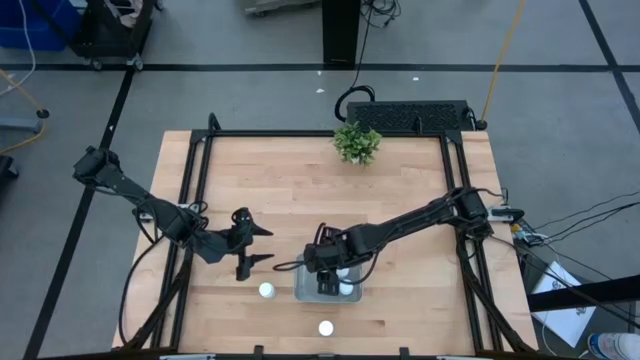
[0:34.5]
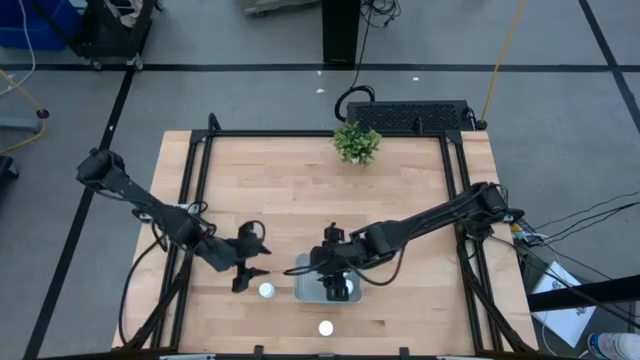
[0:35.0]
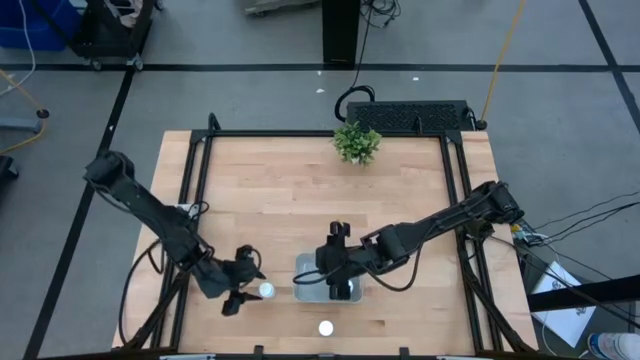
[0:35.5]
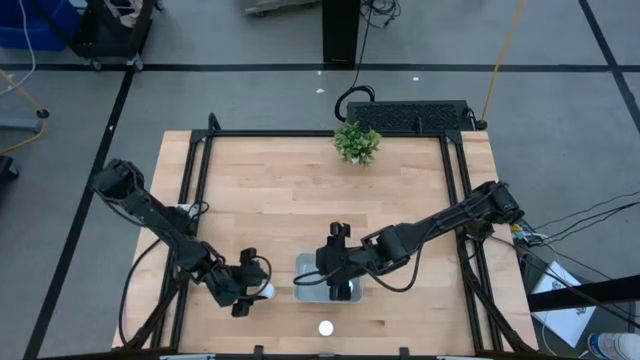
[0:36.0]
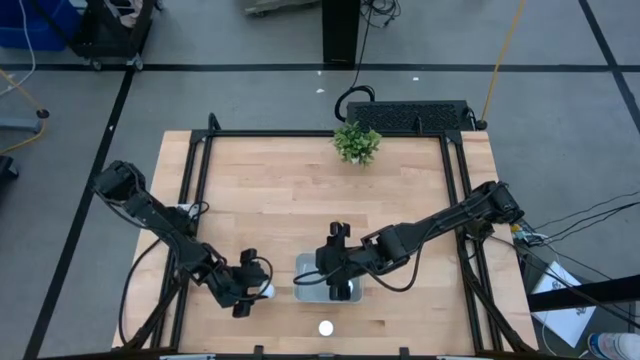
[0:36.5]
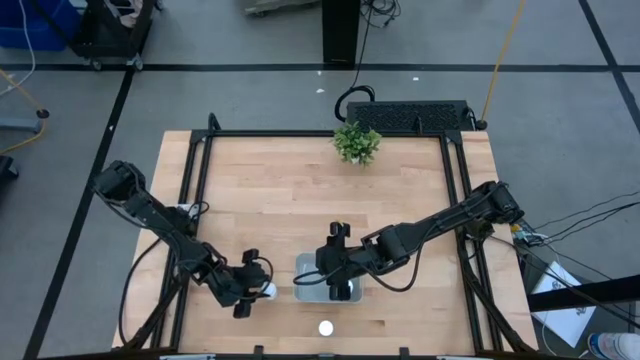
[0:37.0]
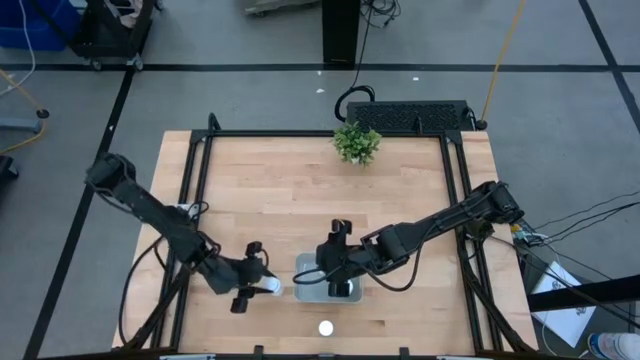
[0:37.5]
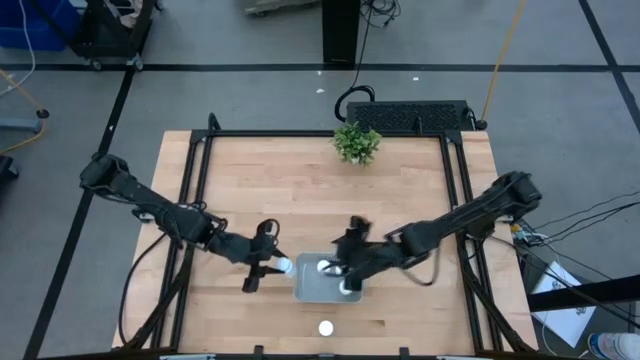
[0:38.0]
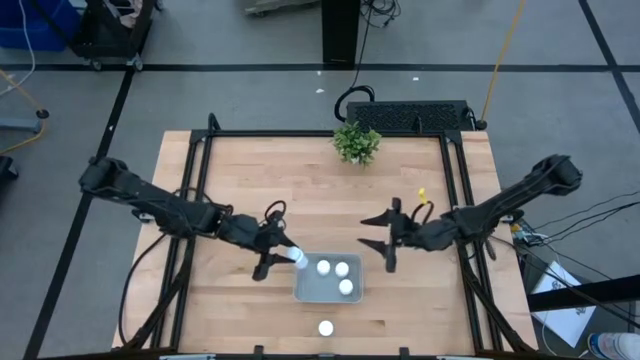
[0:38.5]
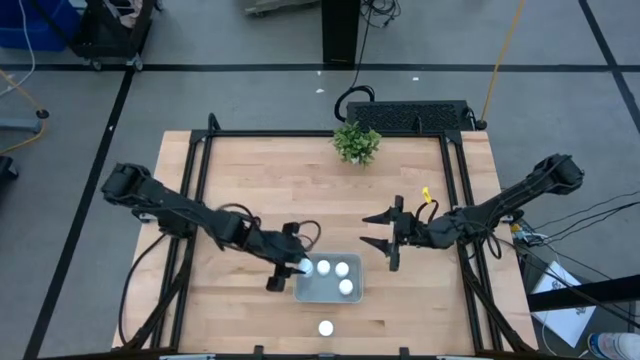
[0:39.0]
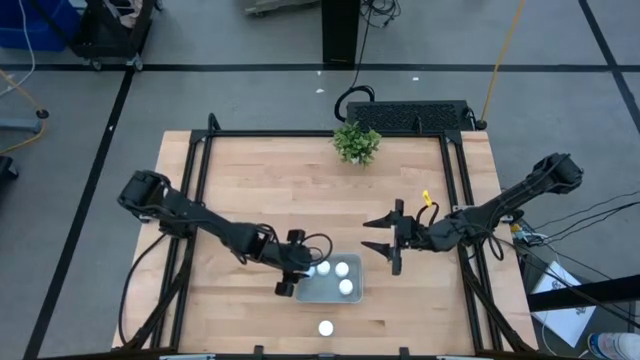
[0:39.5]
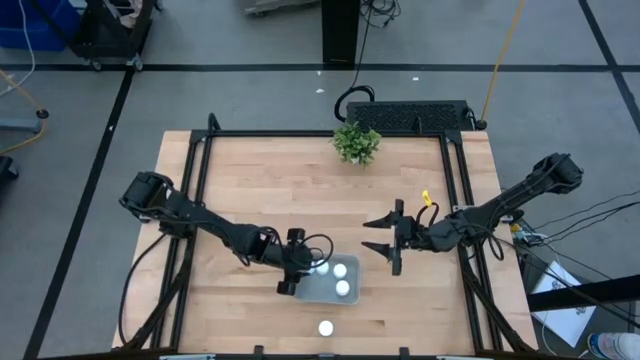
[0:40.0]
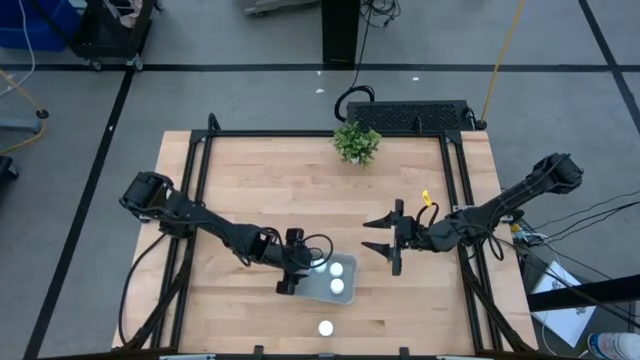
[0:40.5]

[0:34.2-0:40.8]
Task: Pick and place pill bottles into a basket
Put the white pill bottle into the gray bin

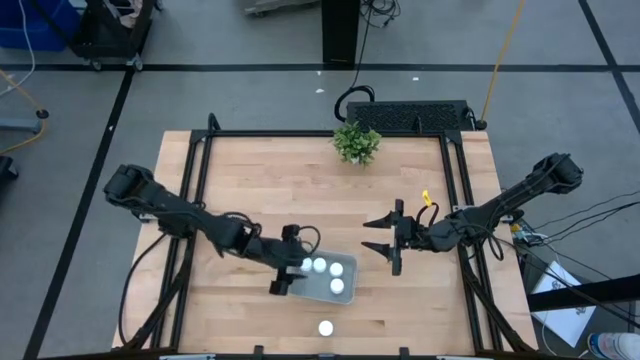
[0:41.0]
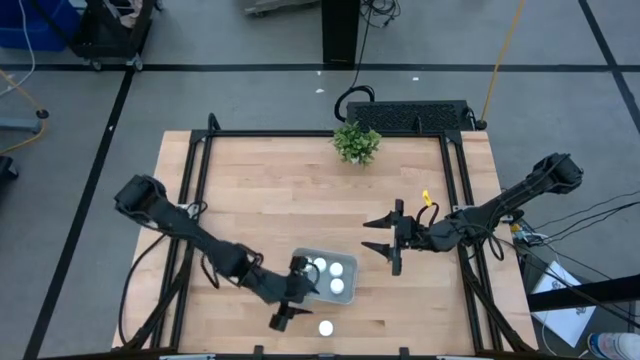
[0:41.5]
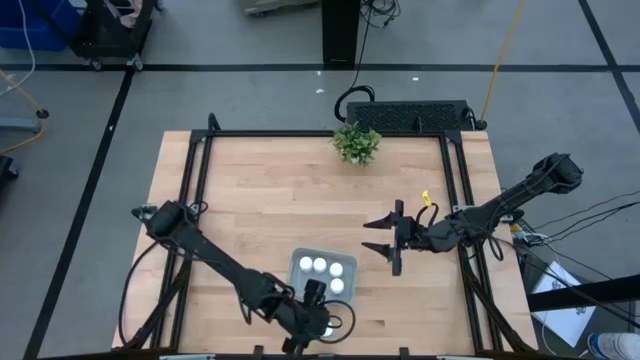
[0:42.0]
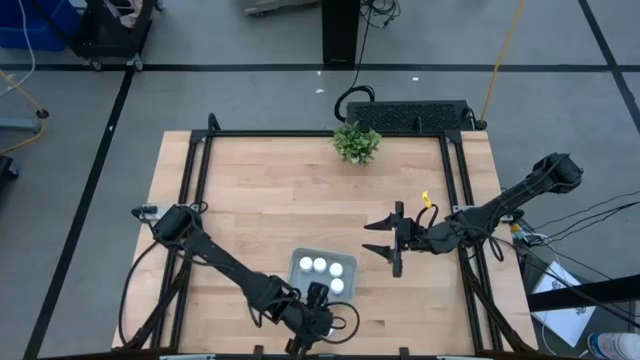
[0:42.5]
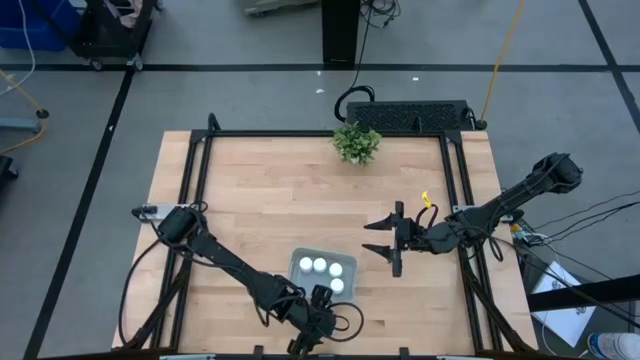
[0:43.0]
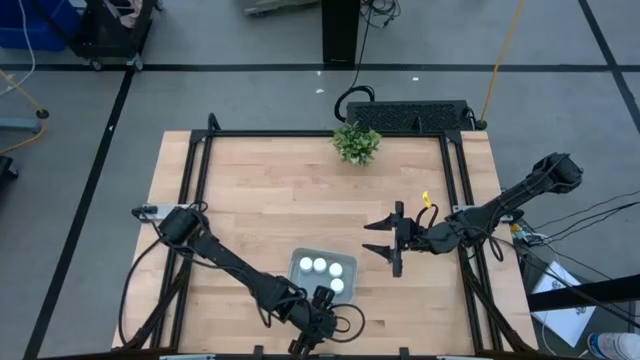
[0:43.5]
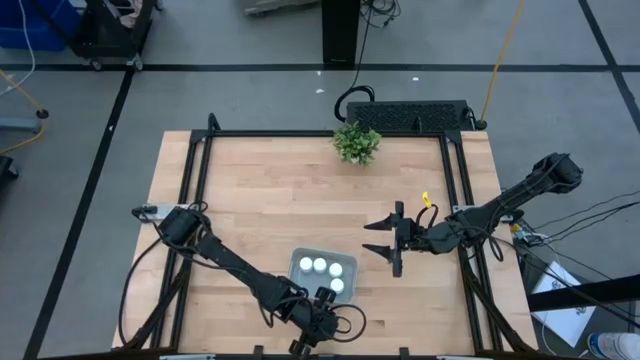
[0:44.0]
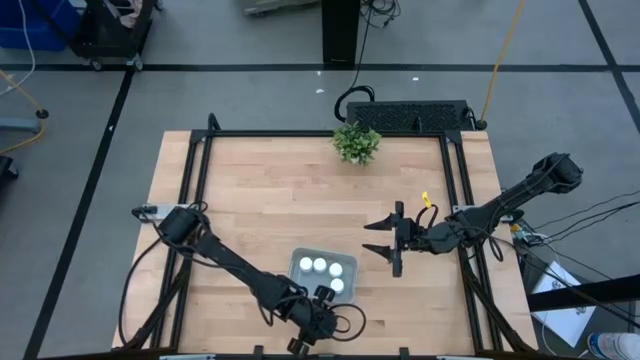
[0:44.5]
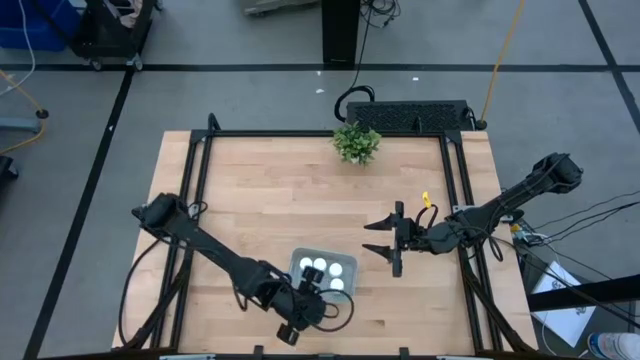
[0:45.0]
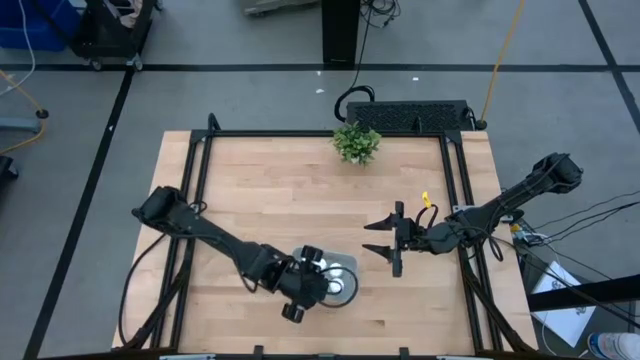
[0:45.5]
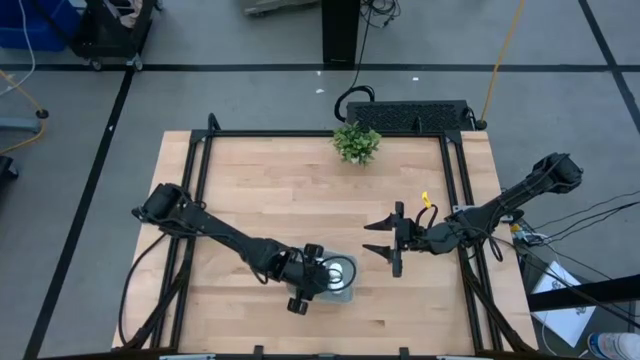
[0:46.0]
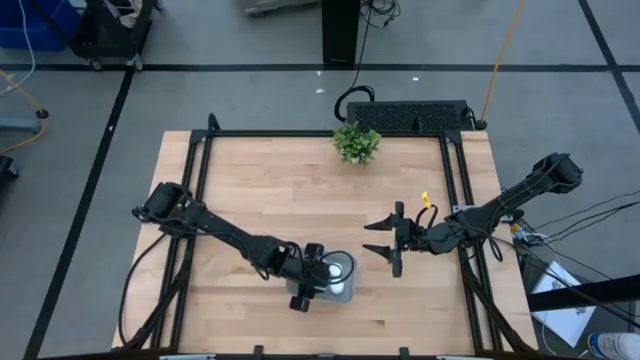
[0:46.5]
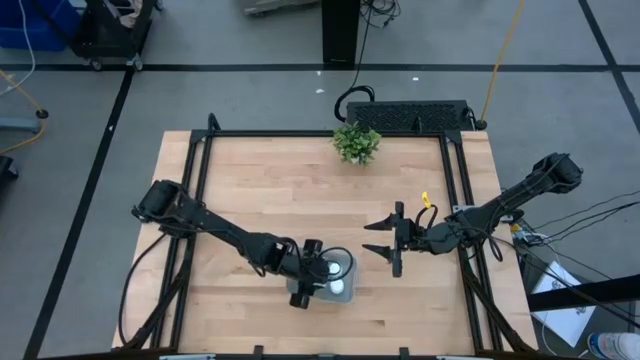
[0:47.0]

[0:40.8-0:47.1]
Put the white pill bottle into the gray bin

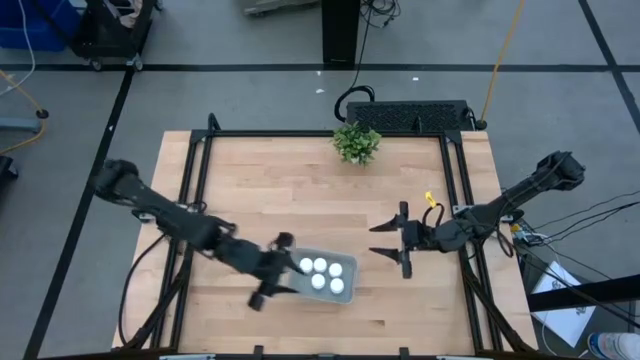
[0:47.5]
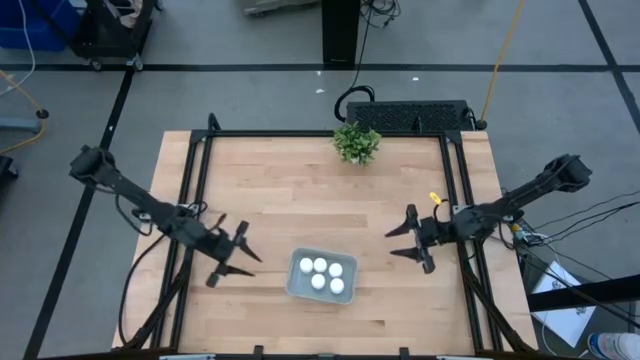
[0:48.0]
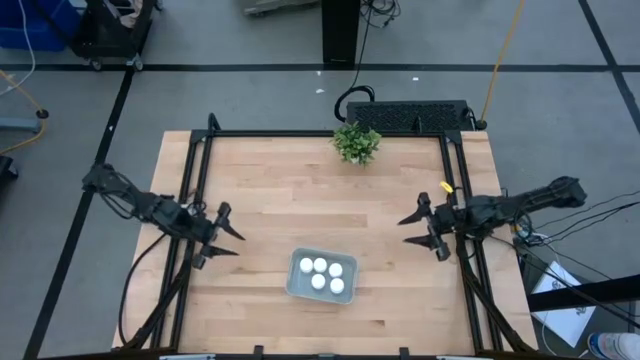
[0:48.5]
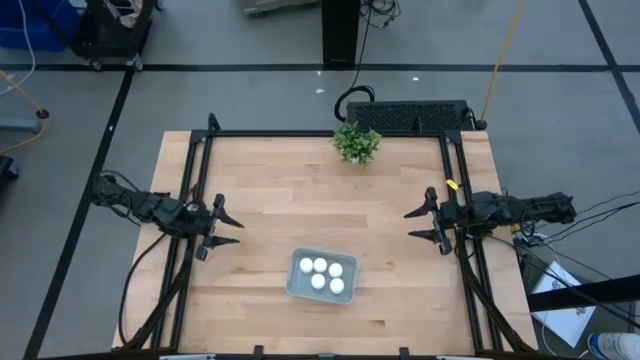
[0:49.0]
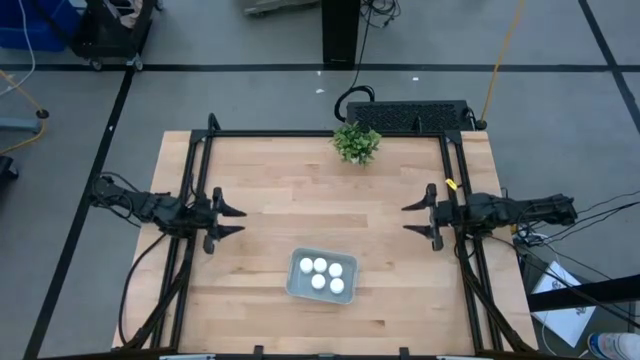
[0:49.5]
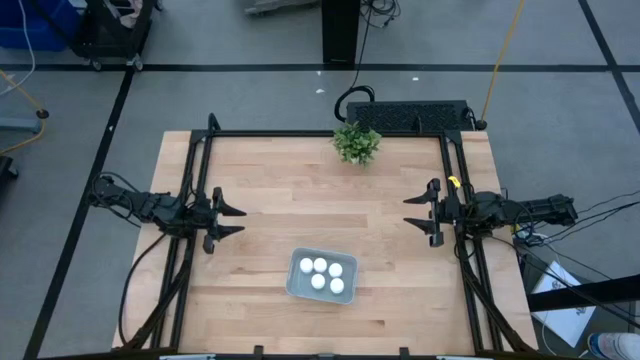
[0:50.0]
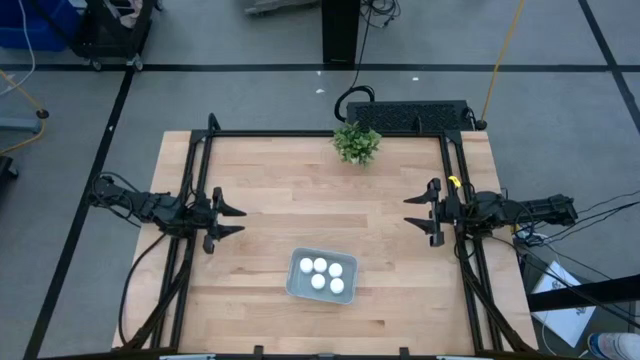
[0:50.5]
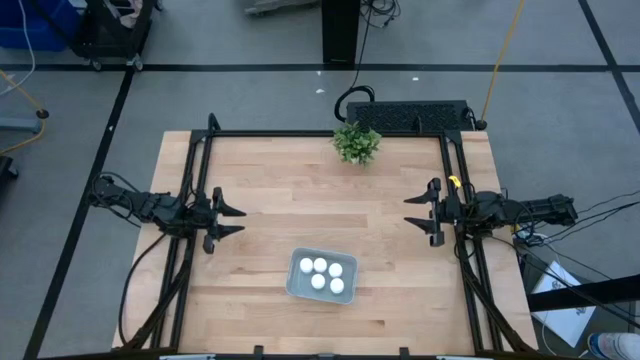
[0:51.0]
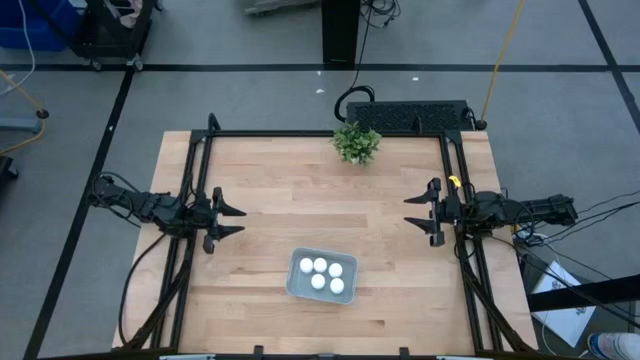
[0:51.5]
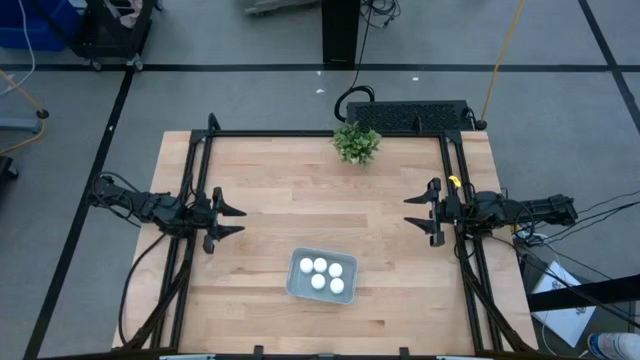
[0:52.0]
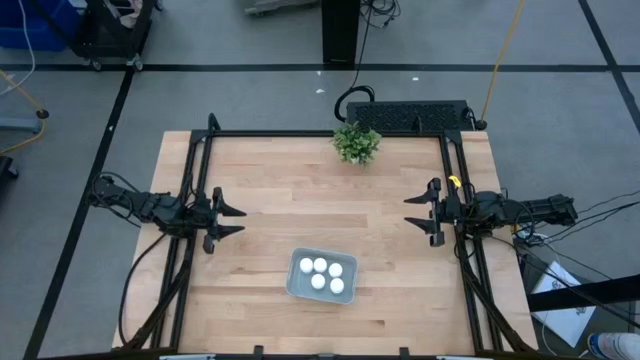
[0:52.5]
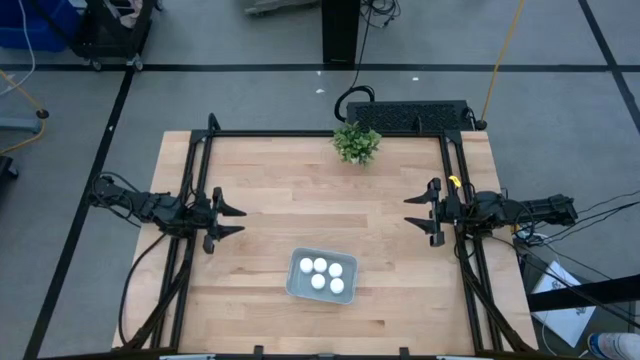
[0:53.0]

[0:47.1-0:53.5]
Return to Home Position

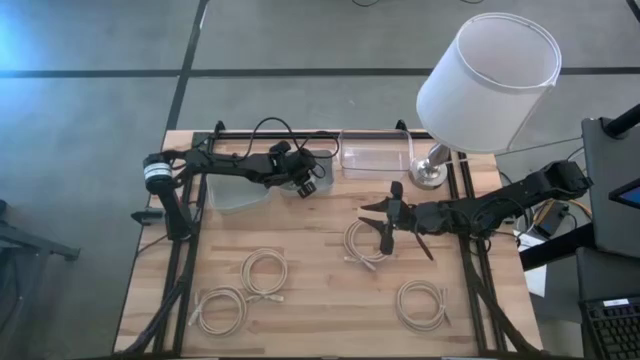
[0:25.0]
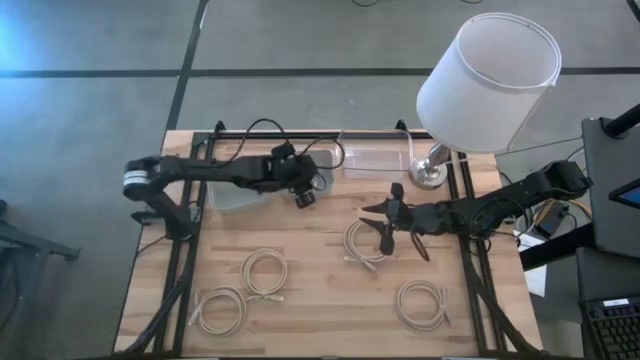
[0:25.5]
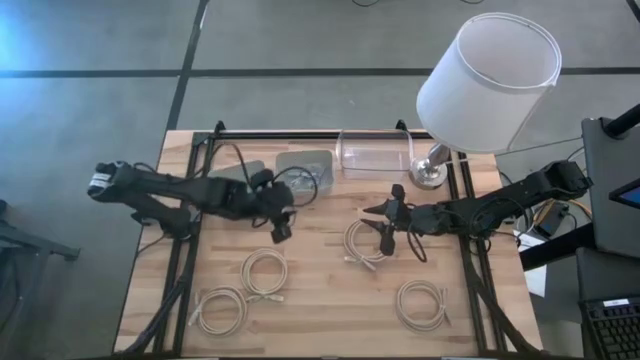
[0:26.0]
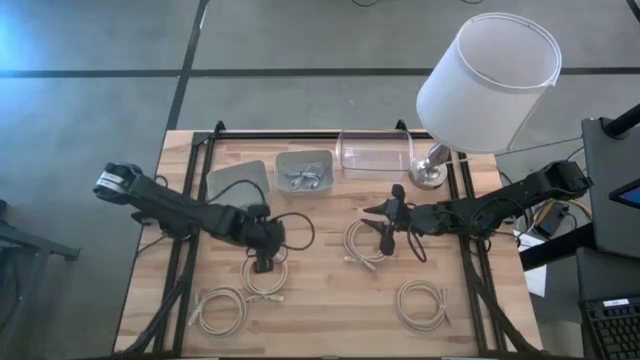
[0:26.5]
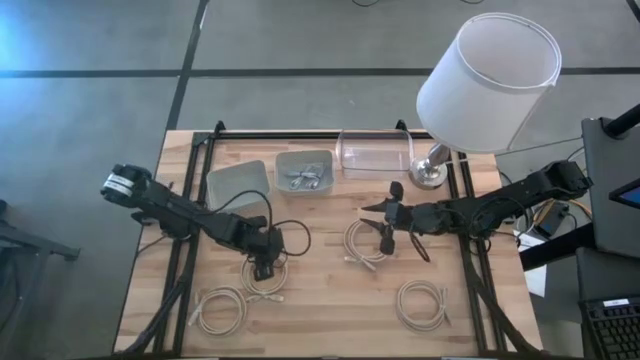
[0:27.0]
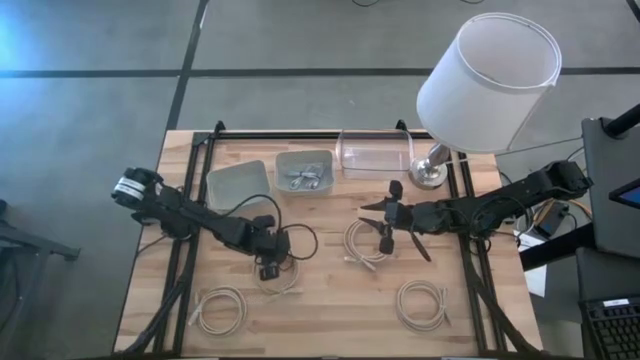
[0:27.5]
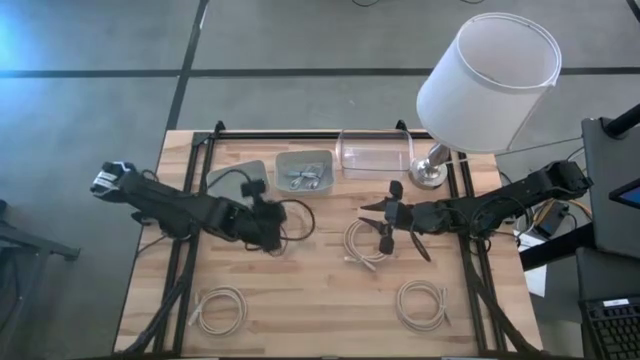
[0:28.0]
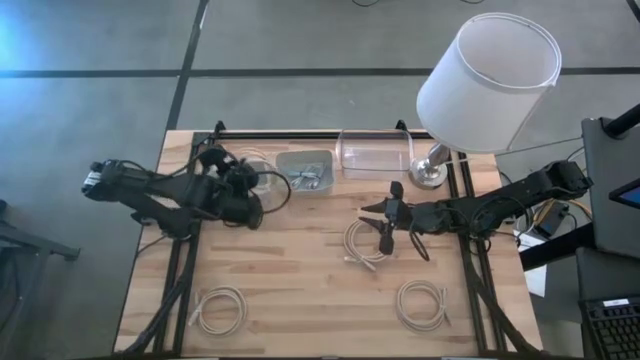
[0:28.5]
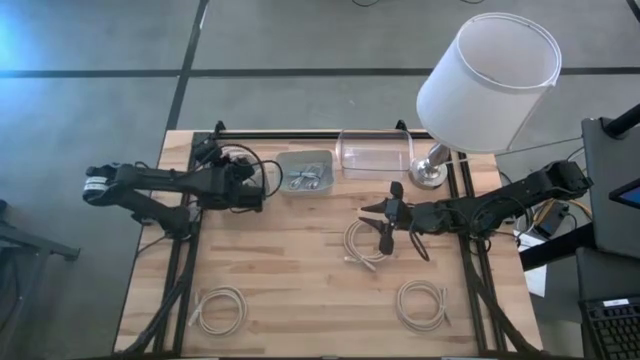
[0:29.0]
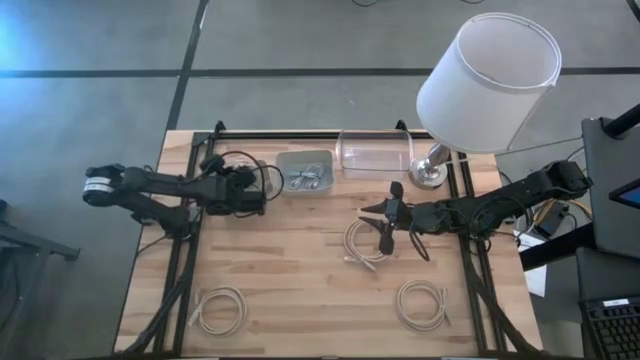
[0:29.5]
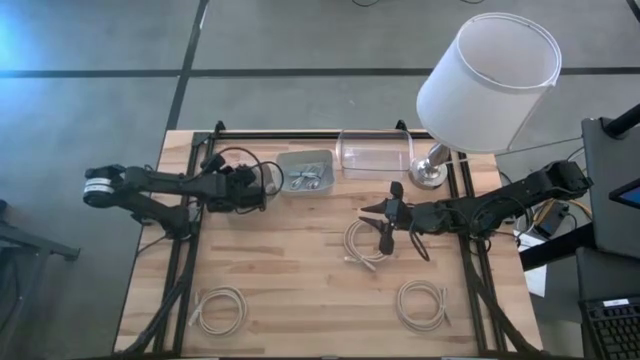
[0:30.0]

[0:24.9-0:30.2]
Task: Pick & Place USB Port
Put the light brown HDMI cable into the left gray bin
